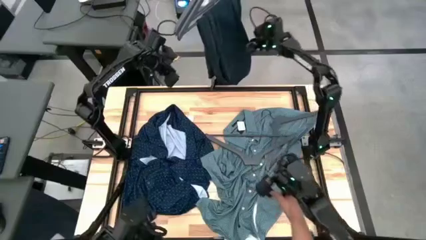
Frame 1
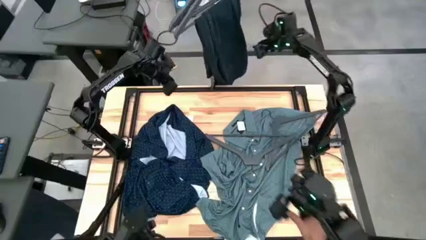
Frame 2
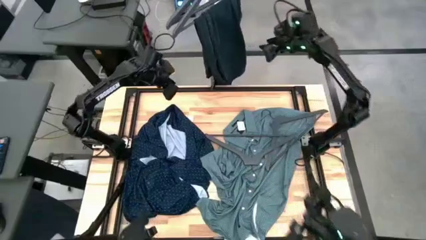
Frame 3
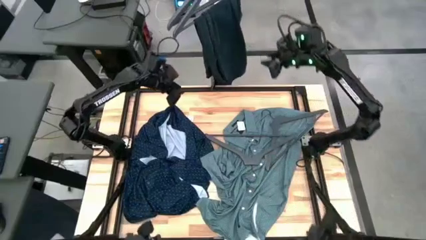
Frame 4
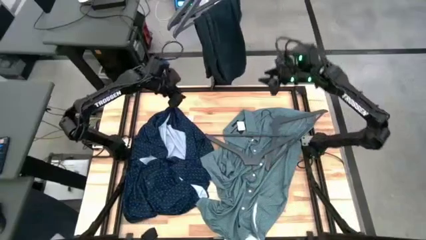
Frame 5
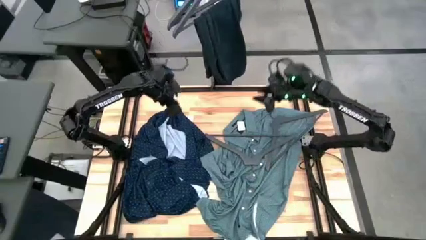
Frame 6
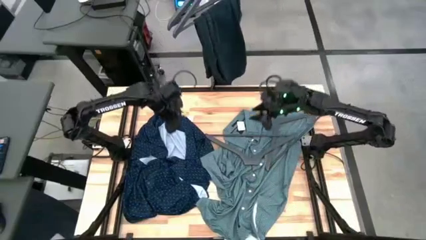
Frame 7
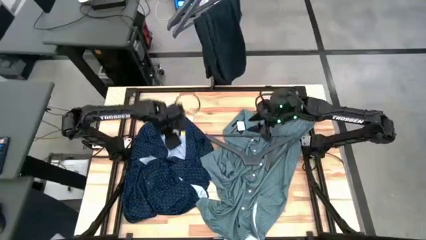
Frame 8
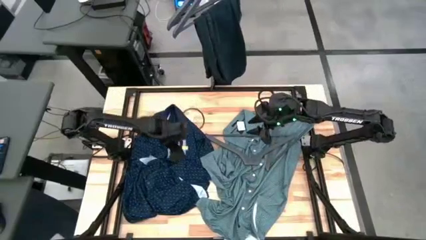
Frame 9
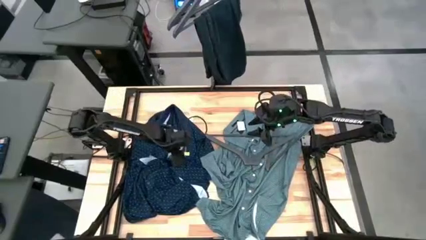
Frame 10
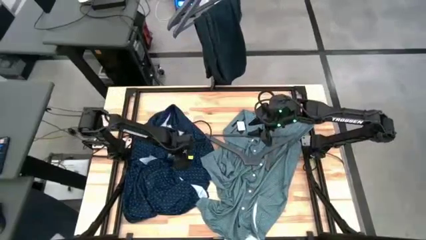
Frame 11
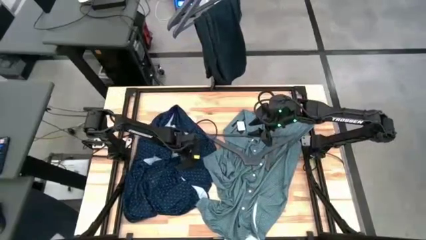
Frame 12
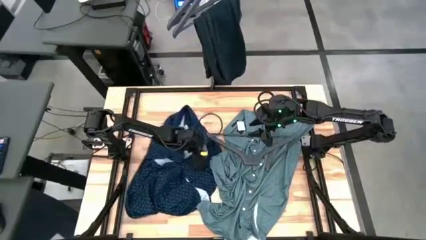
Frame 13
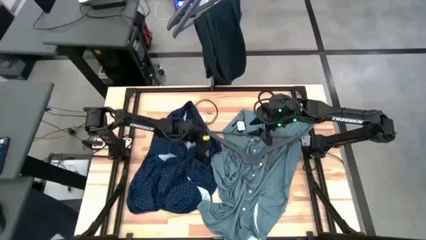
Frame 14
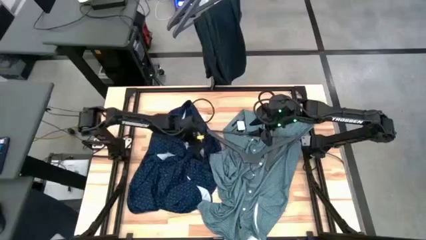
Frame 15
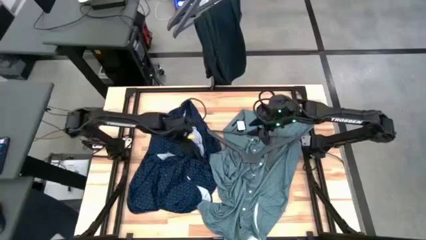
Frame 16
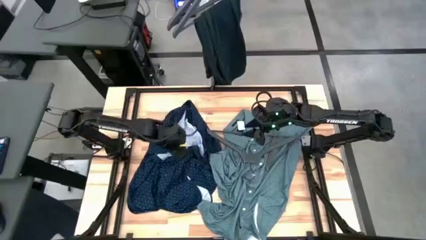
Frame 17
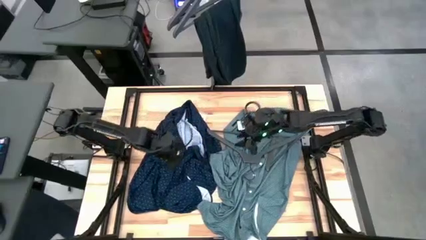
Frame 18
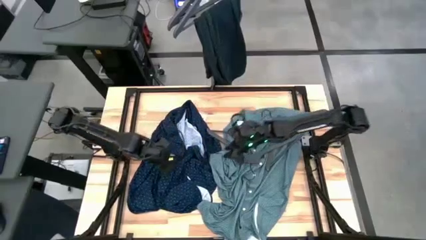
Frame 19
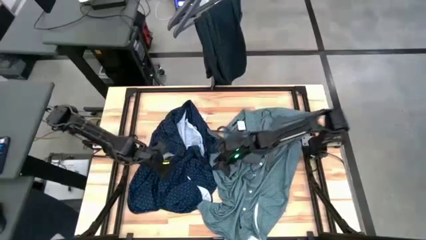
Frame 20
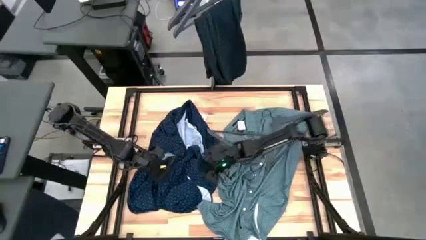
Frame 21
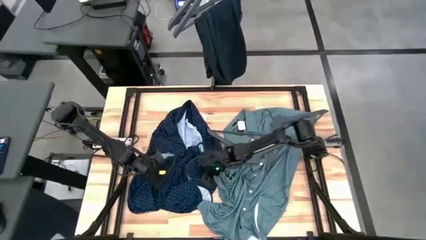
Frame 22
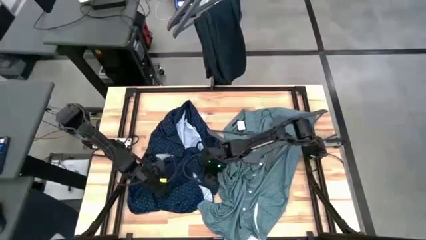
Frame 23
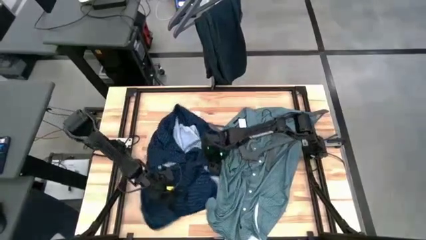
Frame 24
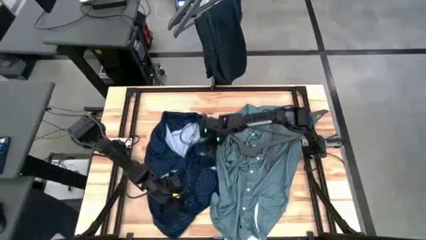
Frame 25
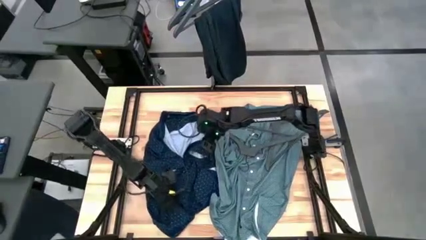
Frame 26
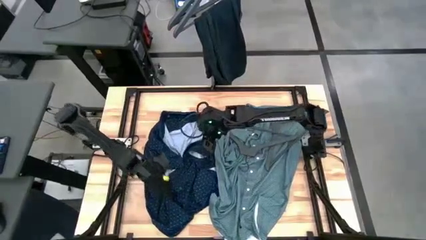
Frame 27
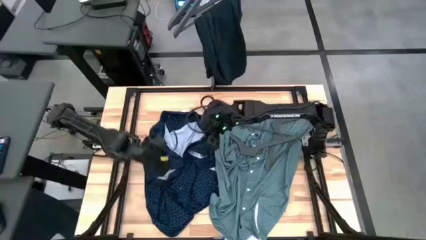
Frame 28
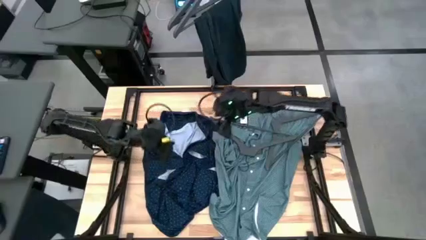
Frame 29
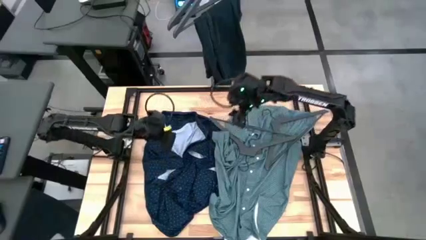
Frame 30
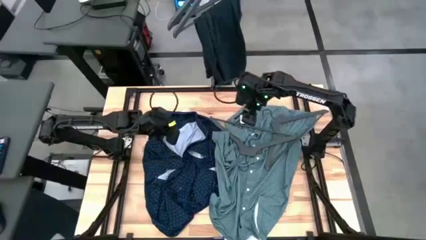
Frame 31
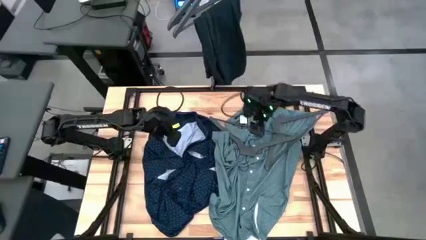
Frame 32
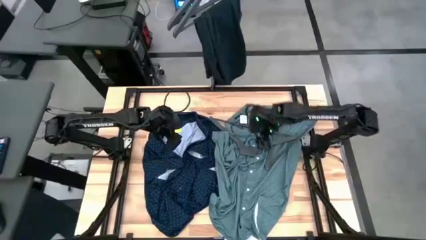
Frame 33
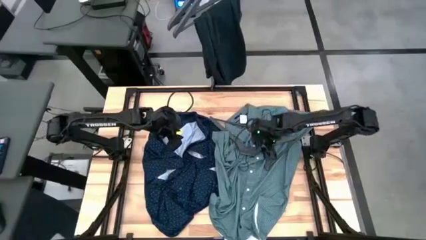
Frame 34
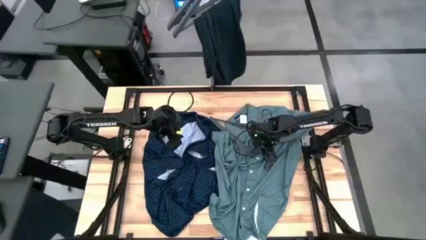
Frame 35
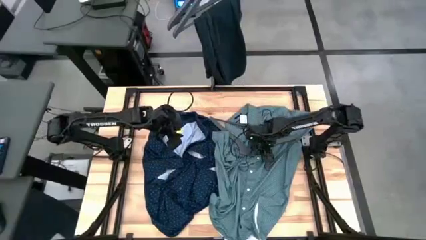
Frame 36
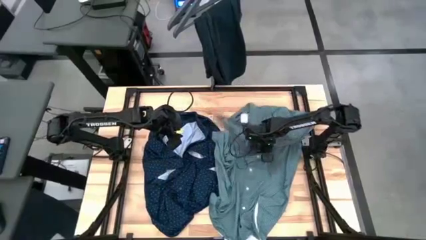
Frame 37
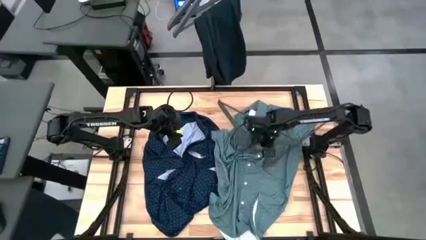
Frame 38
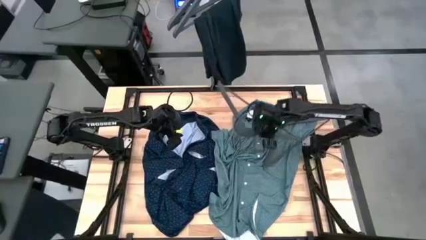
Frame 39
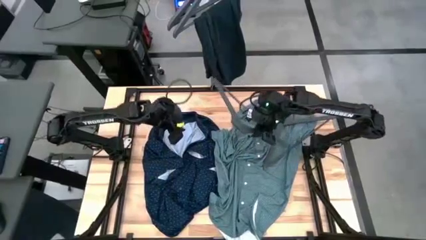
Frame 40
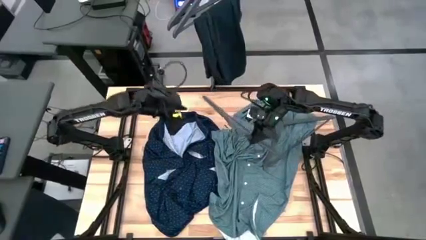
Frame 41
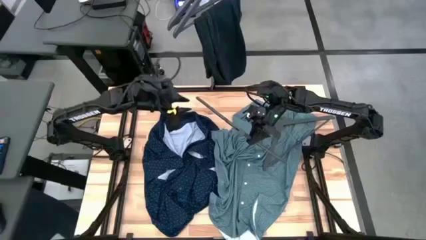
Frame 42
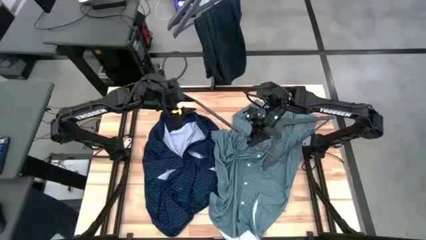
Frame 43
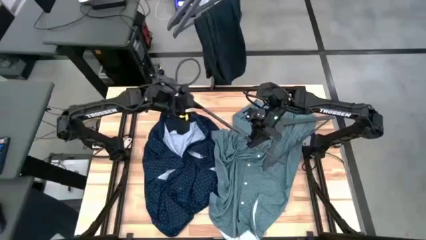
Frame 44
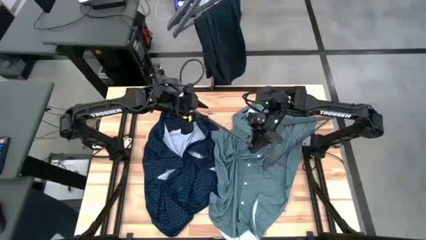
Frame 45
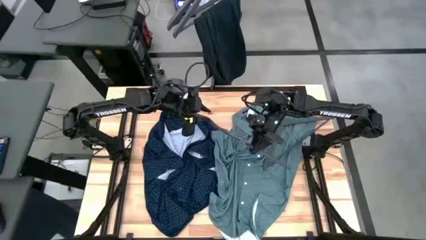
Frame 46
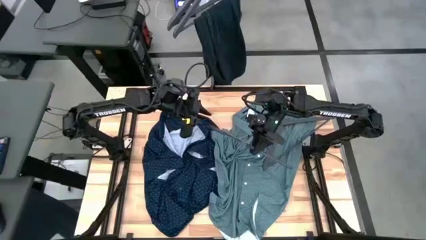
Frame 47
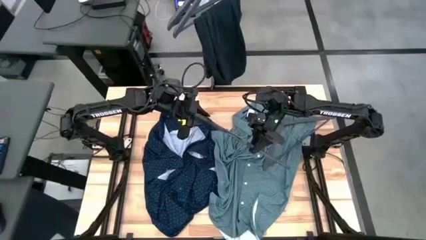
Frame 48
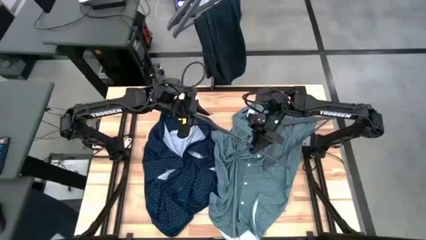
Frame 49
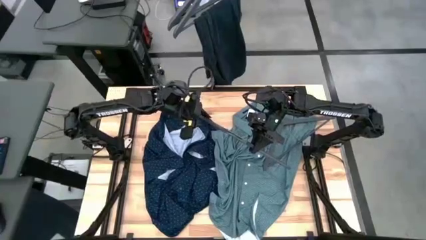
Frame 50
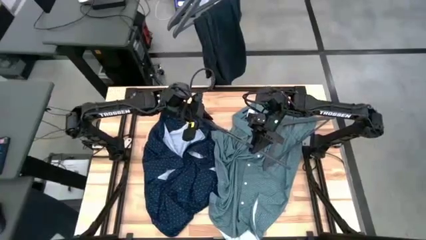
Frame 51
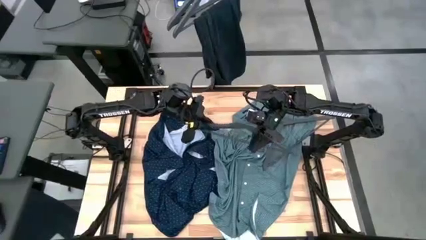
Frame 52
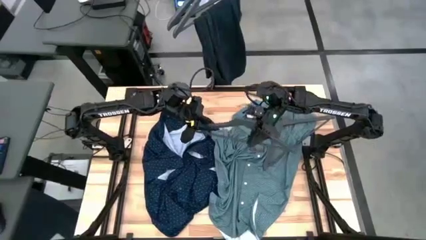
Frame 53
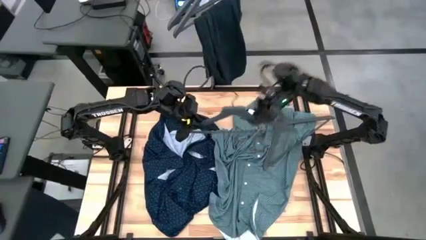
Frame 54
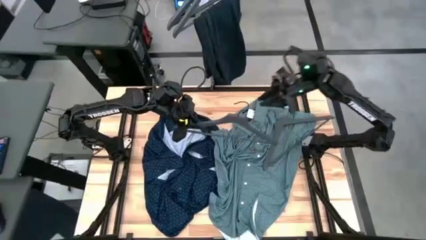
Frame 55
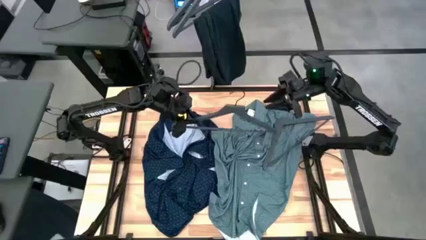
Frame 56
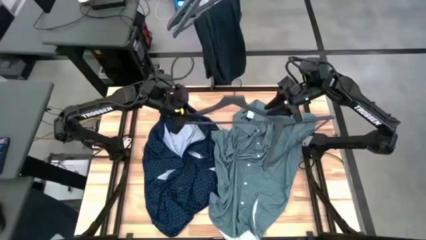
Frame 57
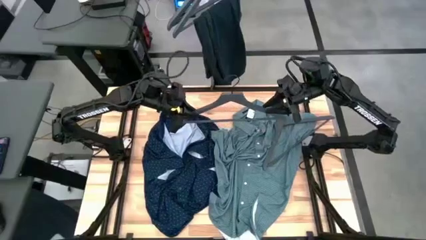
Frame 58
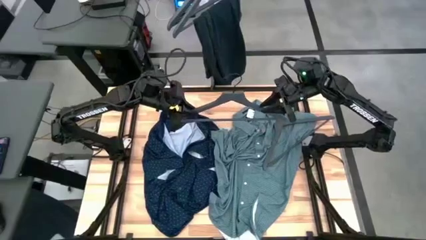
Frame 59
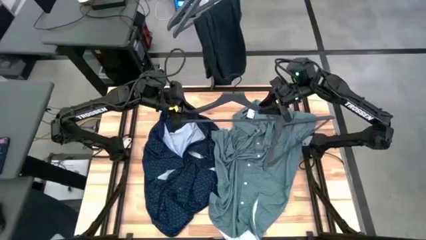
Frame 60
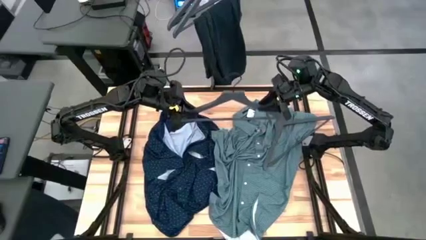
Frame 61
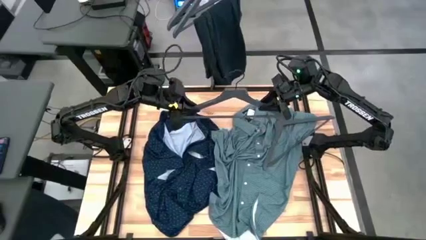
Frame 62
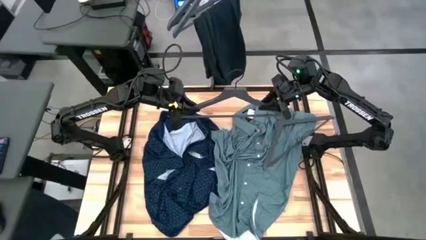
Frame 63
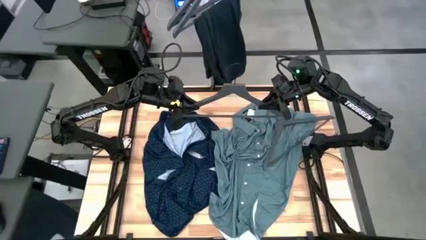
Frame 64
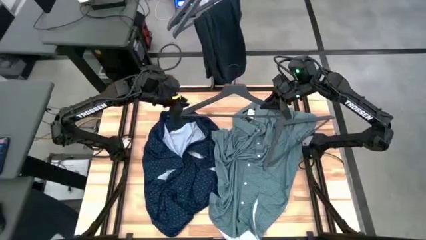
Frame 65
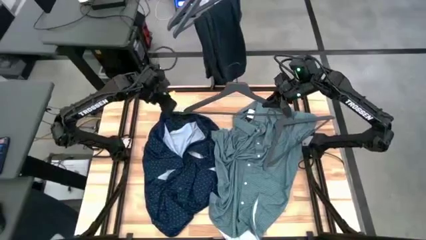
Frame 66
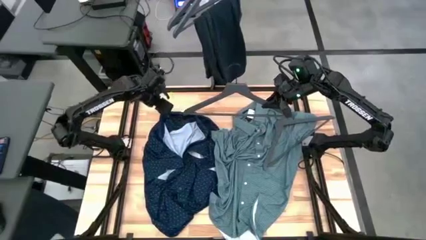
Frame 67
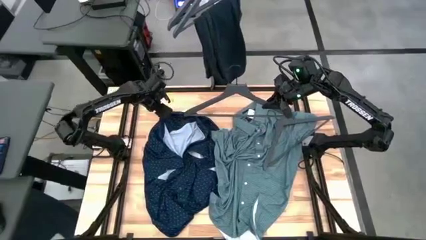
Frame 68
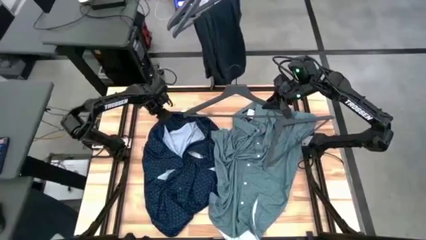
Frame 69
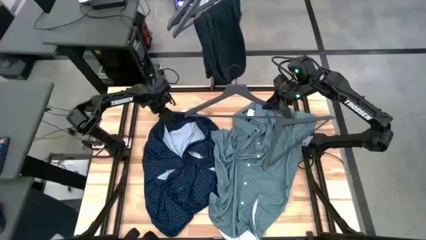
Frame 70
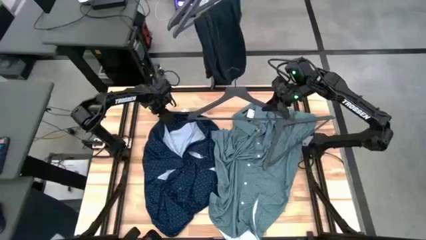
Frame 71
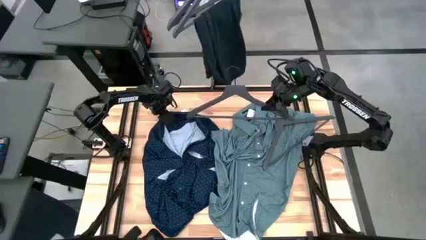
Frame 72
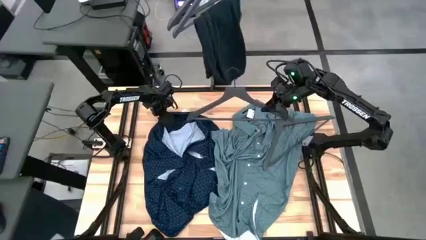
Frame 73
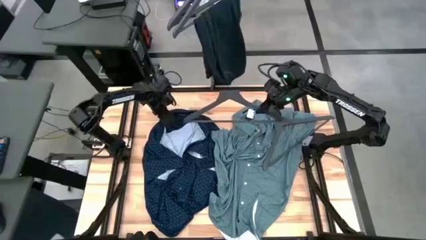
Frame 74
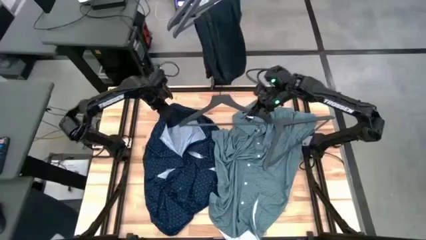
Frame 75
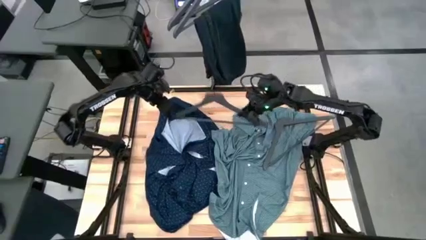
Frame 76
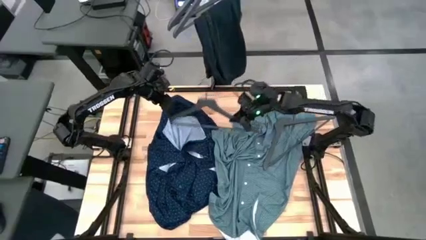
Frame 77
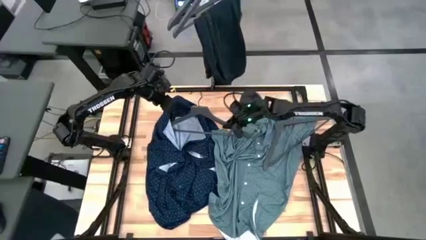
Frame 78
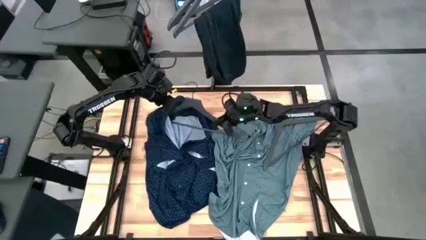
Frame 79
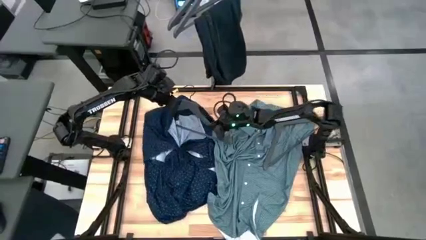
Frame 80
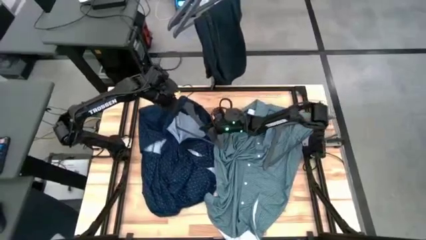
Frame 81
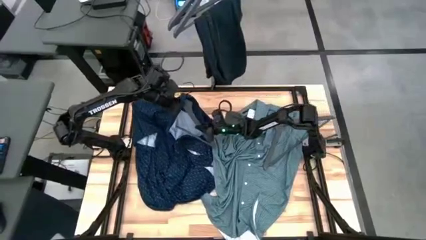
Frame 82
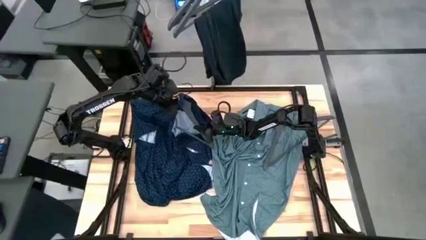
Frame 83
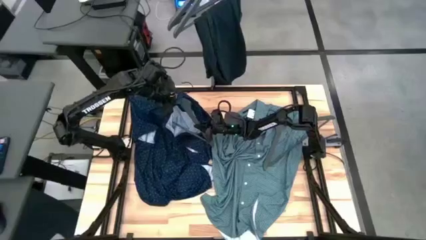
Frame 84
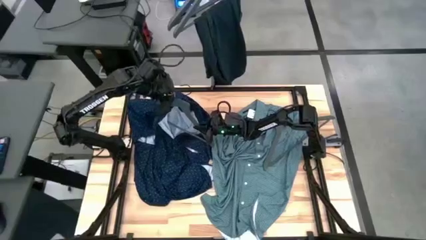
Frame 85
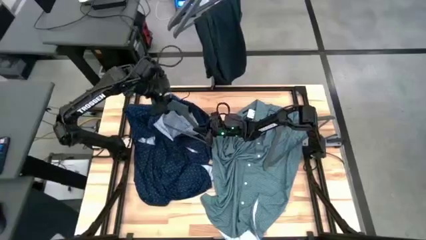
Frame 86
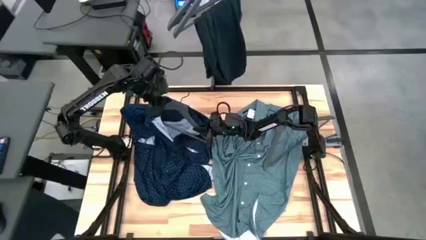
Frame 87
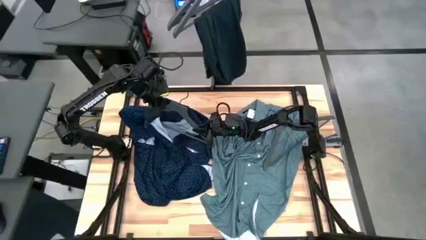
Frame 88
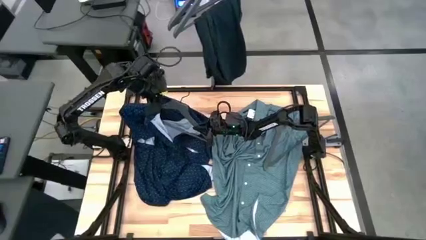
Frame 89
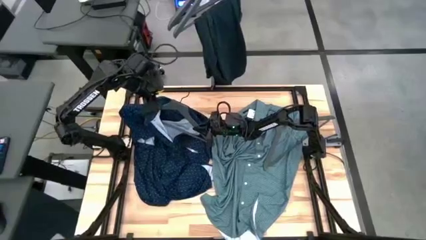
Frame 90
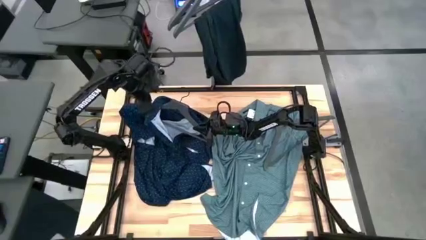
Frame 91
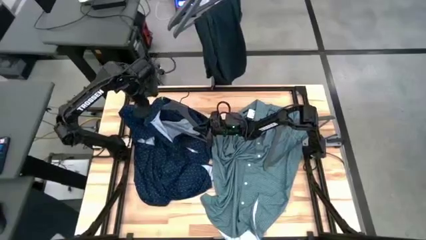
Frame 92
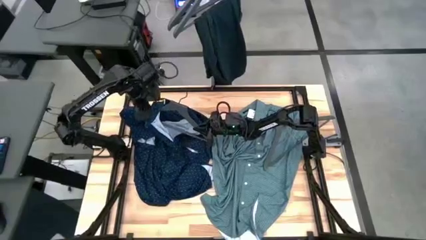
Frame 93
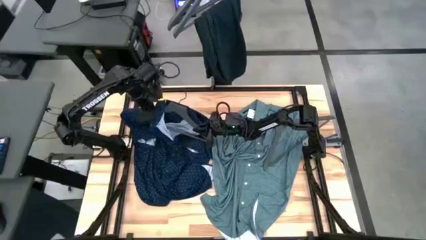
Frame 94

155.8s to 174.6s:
Task: Hang clothes
Hang the blue polo shirt on the rack
